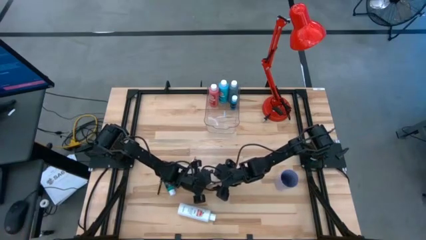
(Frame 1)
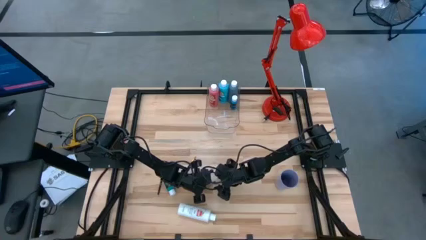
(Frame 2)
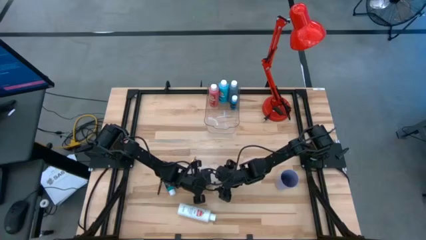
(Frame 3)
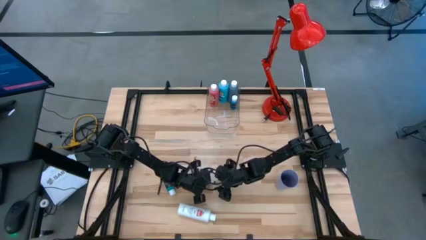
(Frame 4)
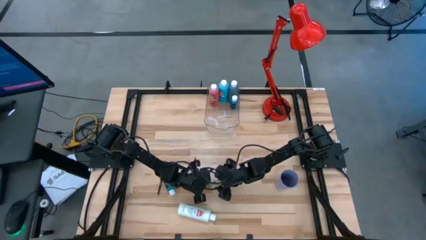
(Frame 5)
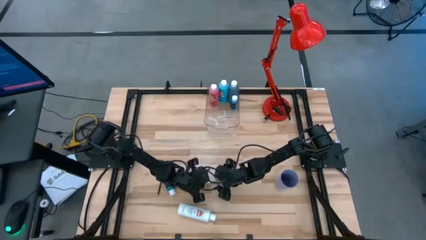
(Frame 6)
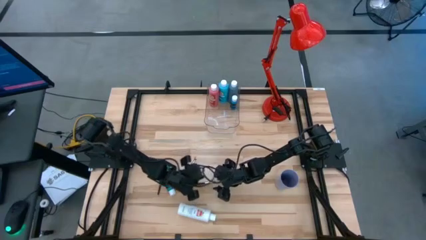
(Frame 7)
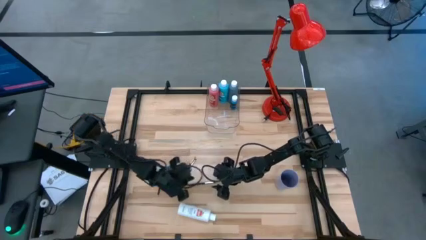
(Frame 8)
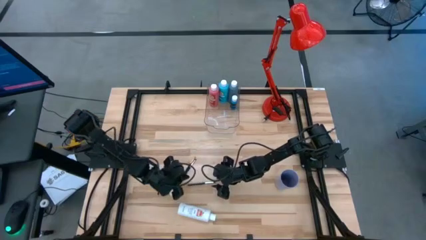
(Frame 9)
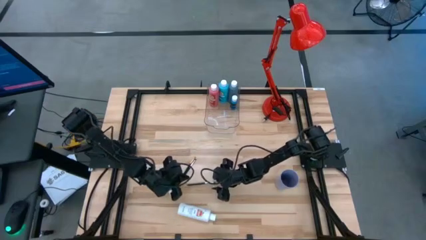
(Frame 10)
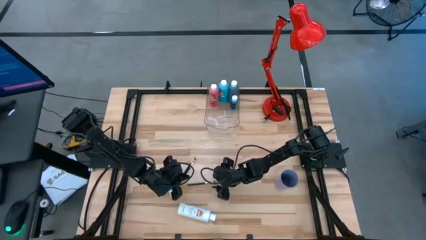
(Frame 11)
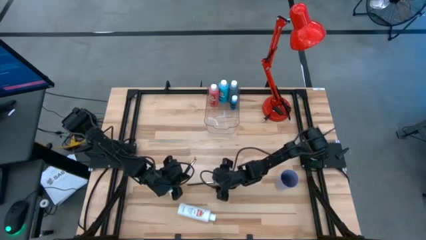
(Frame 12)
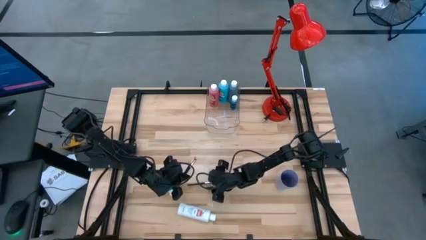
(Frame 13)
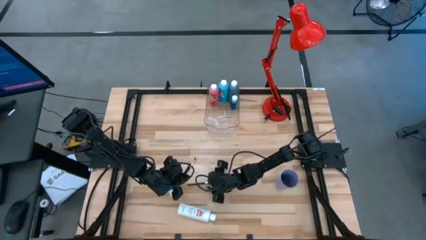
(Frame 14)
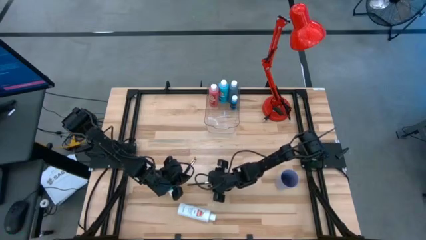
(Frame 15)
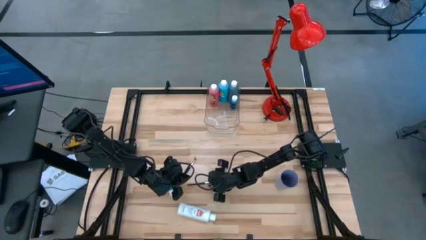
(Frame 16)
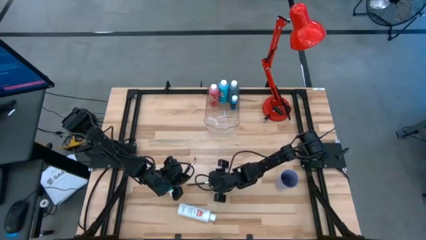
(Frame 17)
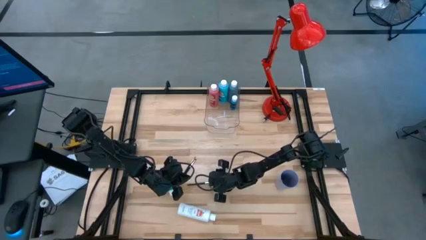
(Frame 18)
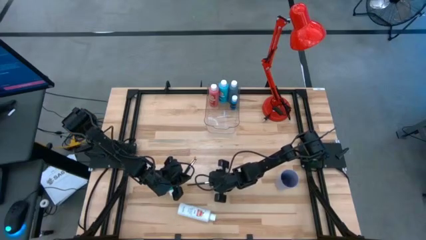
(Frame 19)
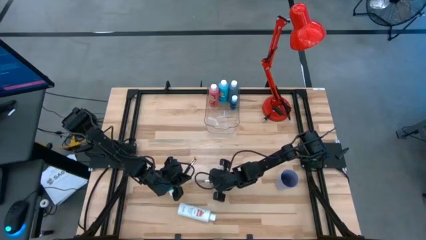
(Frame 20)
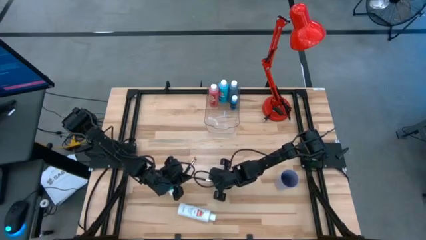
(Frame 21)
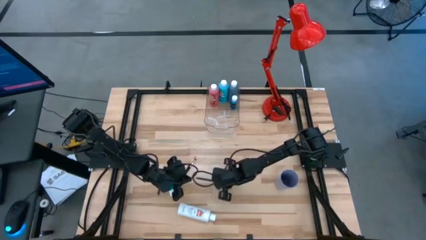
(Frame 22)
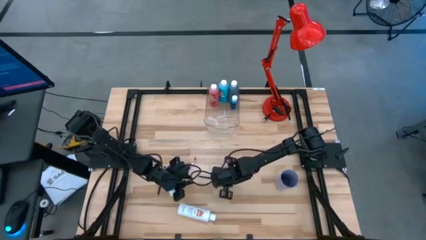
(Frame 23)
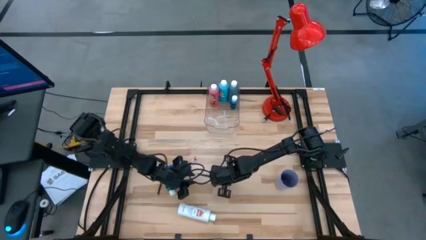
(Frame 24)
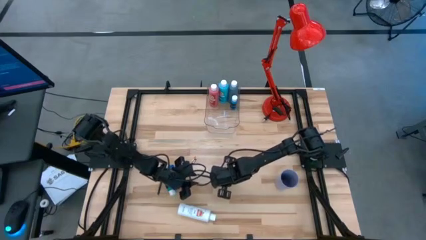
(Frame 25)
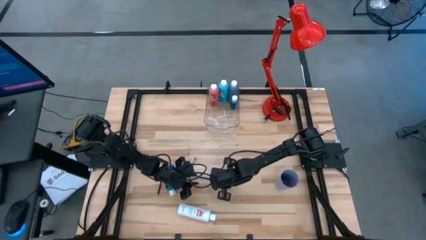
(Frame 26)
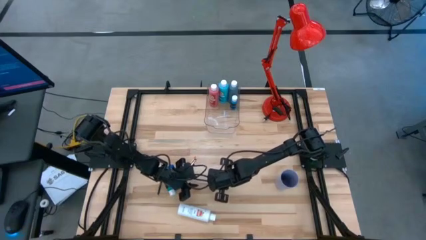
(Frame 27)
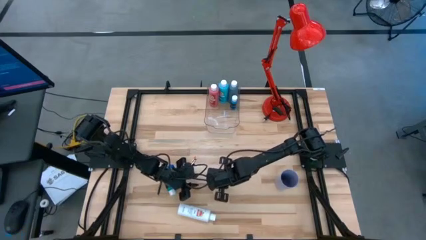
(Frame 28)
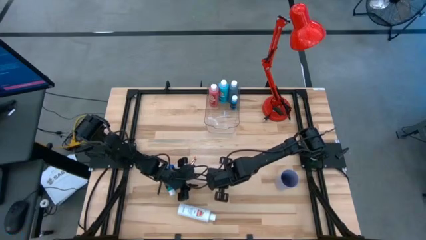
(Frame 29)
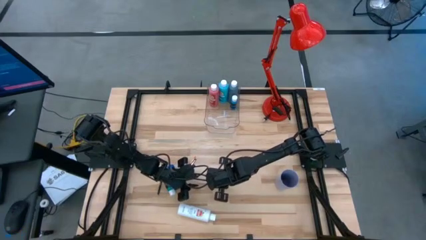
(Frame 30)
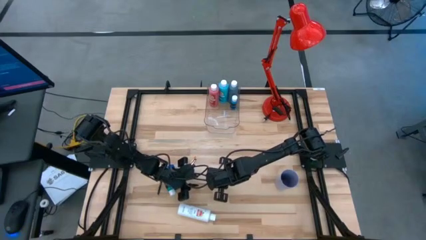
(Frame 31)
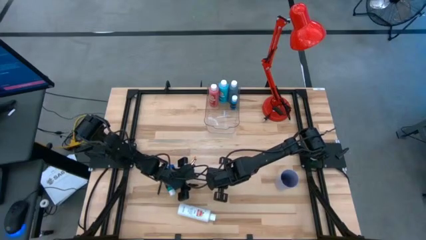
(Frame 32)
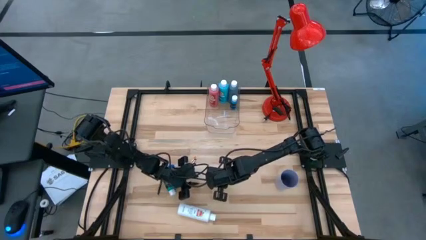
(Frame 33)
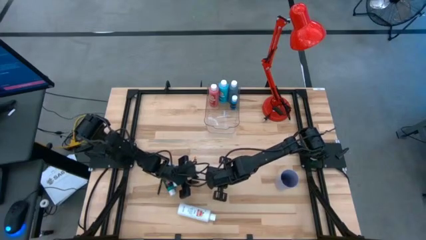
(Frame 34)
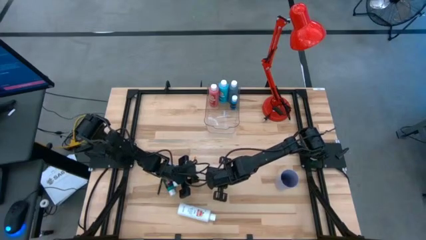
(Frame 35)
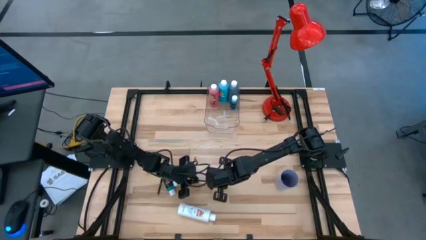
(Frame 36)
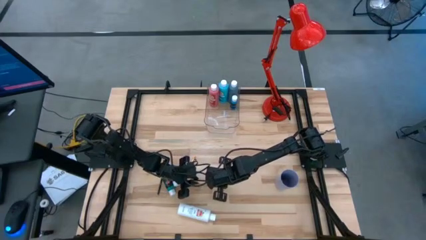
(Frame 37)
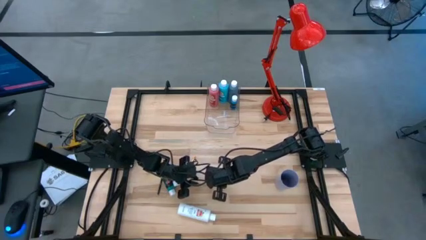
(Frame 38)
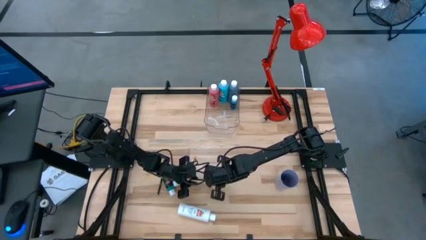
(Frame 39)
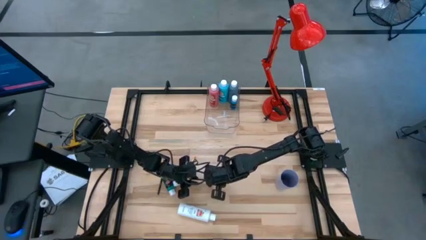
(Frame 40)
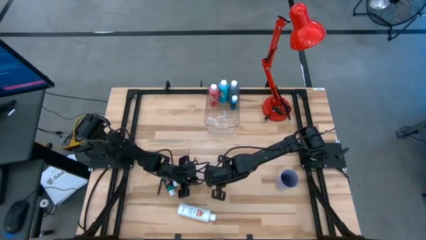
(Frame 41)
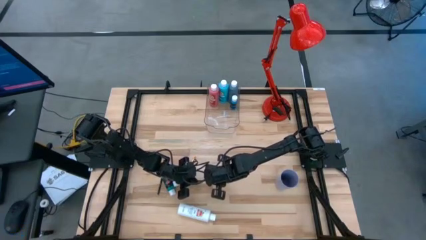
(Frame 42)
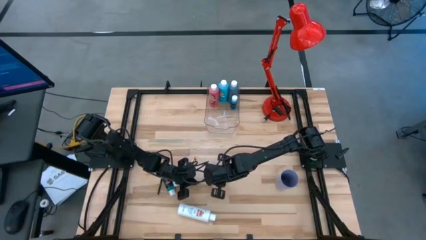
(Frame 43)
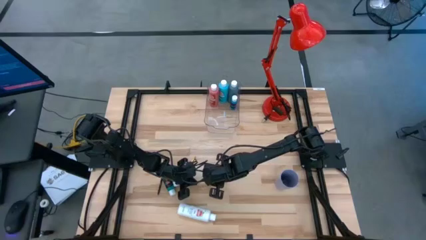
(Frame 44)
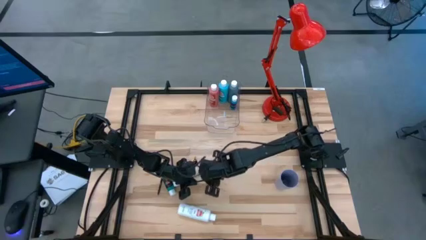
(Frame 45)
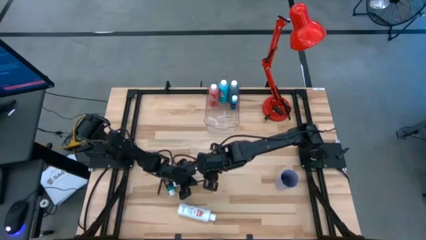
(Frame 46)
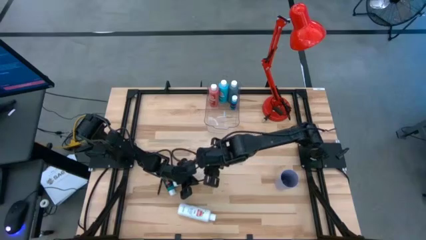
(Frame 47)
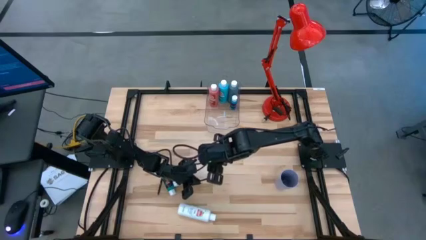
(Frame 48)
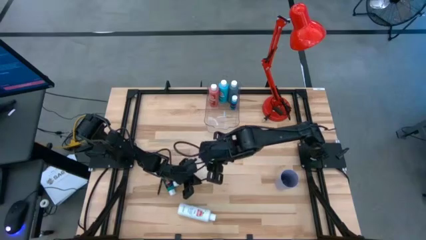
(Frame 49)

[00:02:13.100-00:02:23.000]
Task: Pick & Place Paint Supplies
Put the silver paintbrush into the purple cup

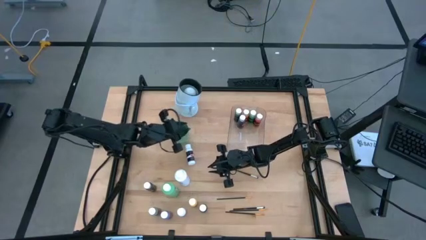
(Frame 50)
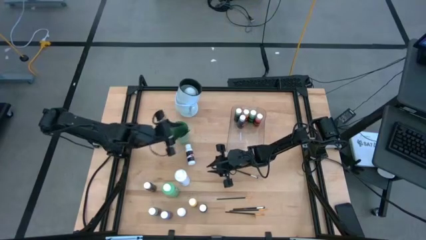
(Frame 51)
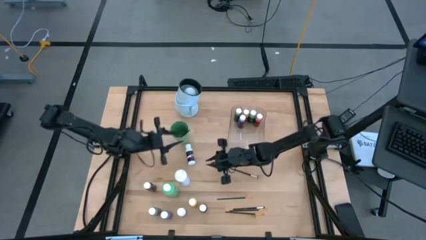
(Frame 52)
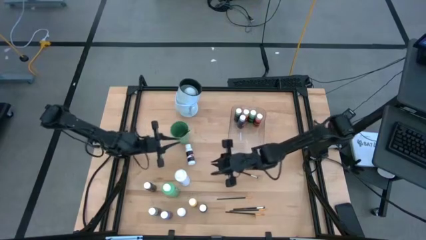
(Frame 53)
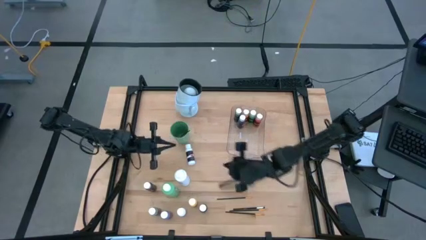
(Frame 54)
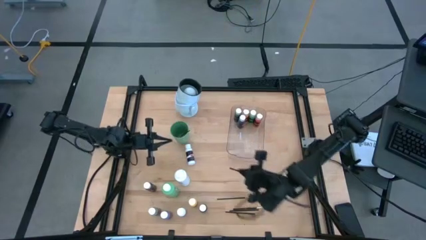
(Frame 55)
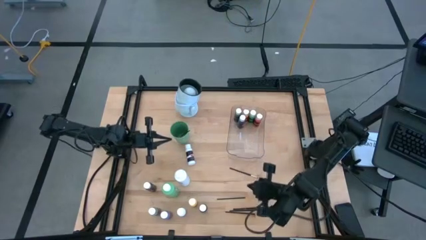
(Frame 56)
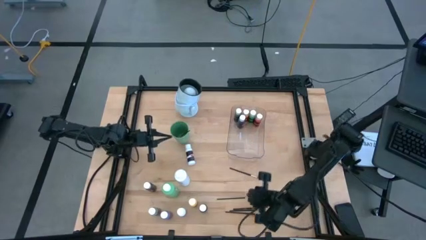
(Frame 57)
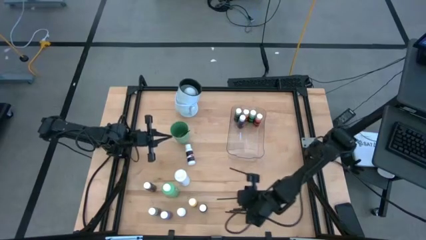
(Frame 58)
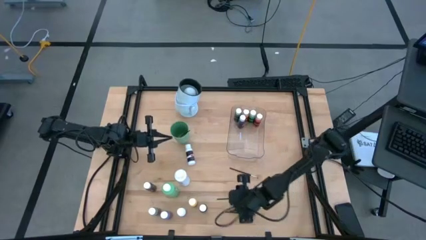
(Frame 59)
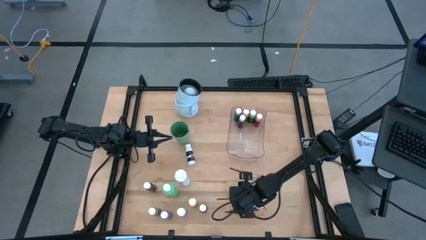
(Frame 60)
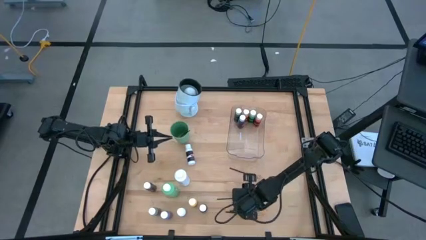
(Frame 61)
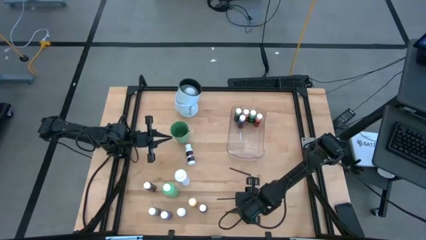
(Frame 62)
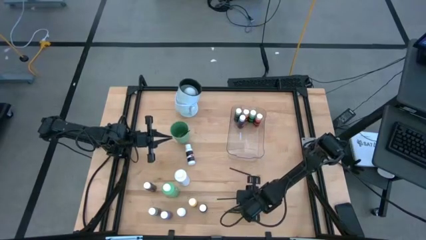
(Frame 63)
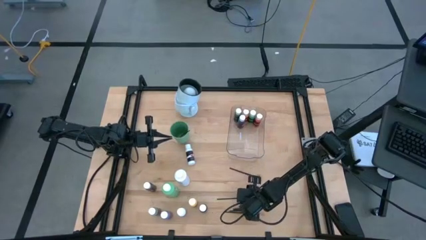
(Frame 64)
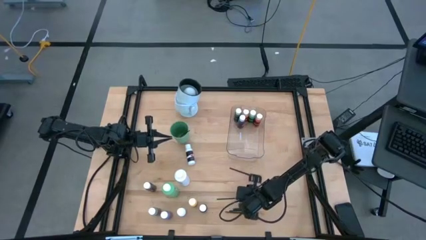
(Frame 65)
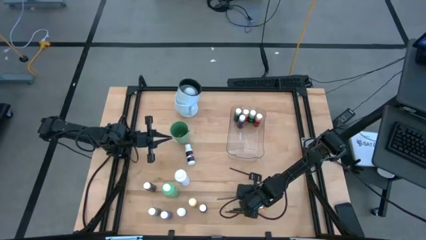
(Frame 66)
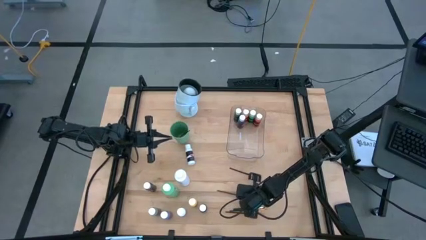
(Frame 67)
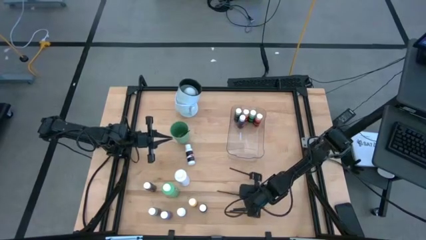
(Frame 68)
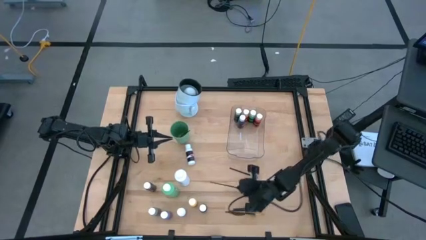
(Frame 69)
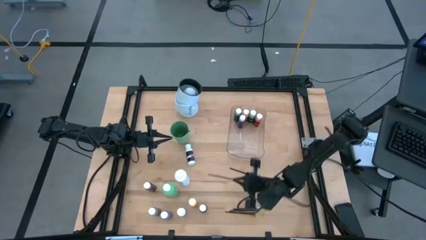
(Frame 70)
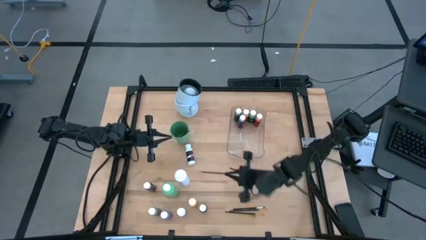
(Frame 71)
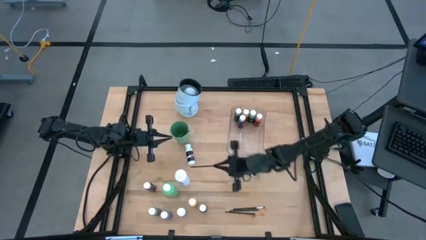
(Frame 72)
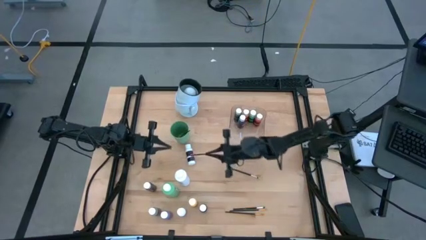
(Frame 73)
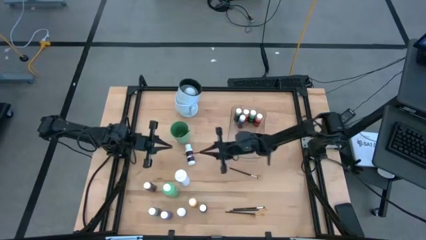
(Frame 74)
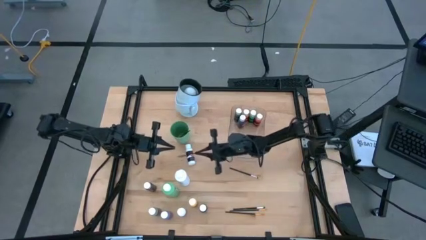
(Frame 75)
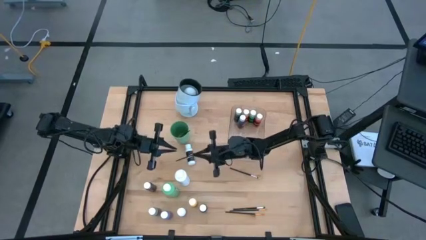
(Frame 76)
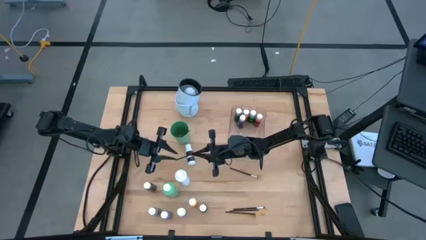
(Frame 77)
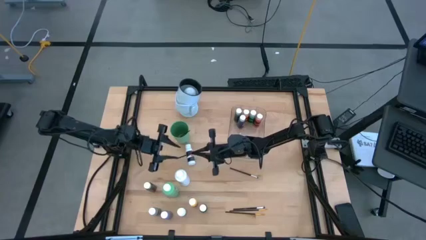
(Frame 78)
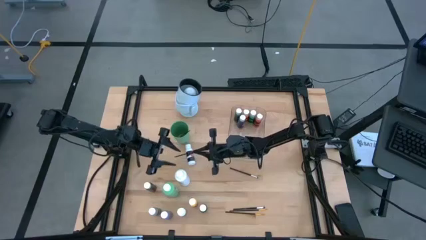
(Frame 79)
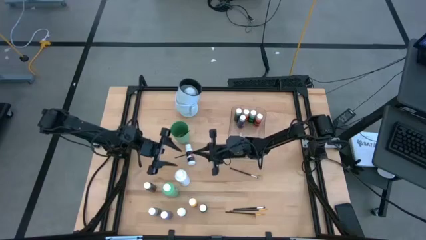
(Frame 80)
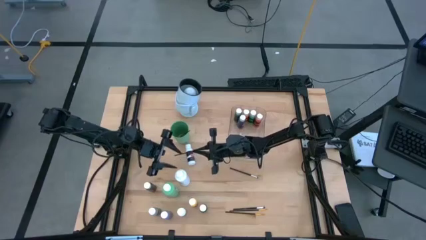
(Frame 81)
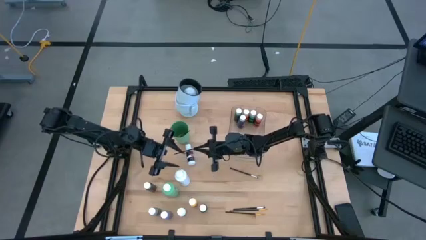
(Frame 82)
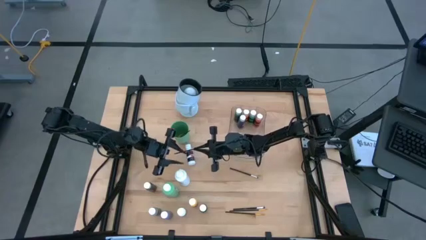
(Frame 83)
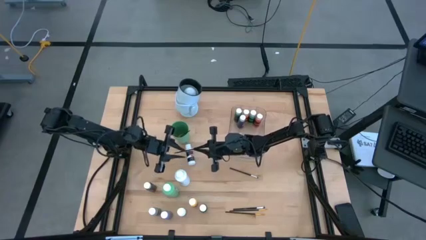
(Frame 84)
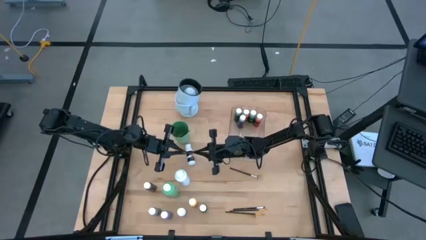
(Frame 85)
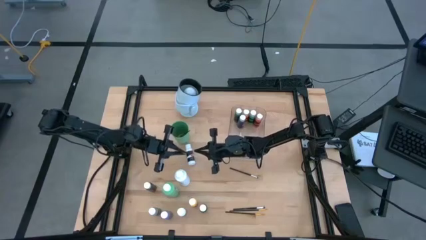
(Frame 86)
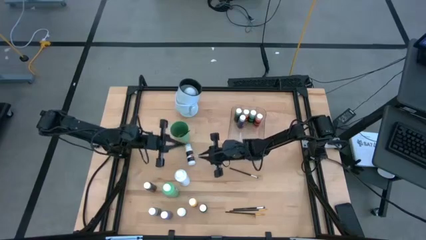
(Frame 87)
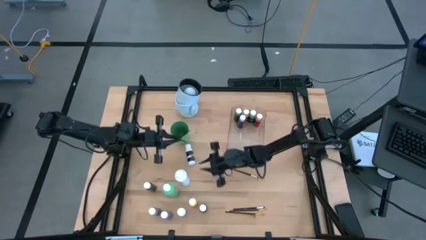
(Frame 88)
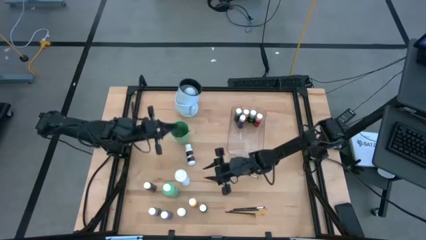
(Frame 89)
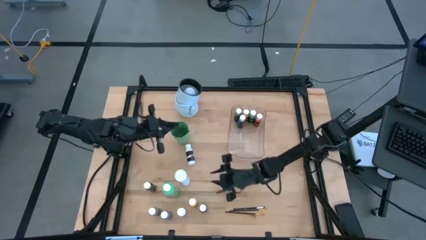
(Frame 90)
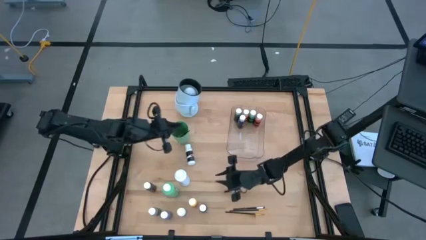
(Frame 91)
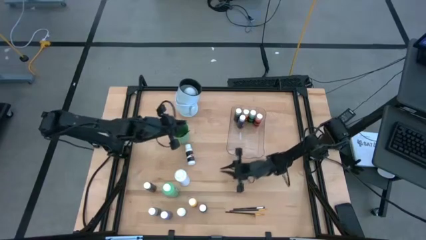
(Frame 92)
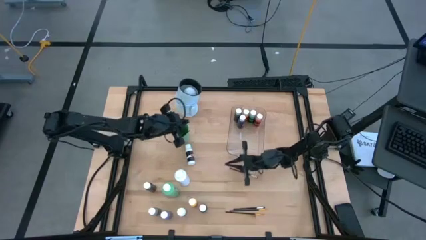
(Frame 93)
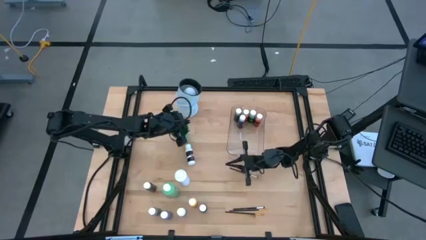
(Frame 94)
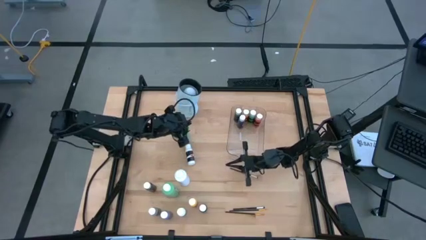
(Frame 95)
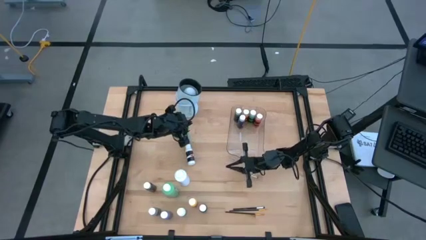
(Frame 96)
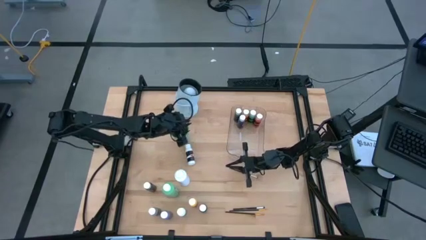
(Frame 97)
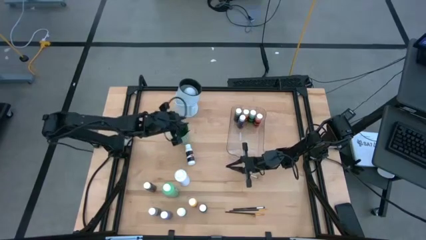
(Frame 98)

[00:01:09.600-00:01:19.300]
Task: Pick & Place Paint Supplies
Put the paint brush into the cup
